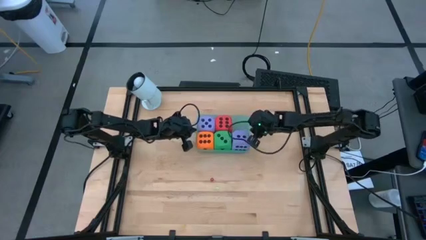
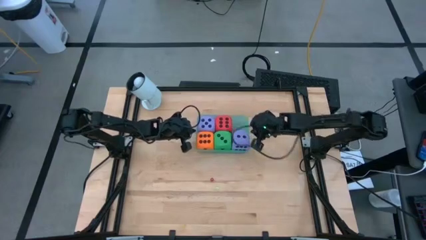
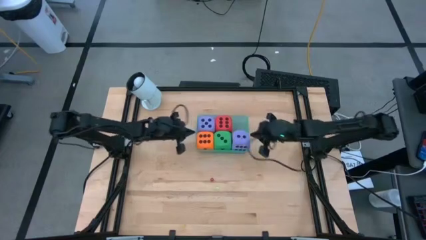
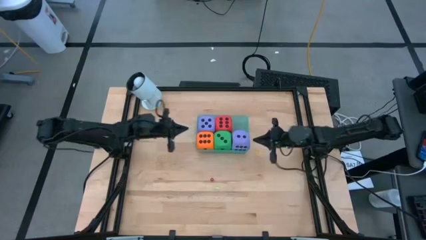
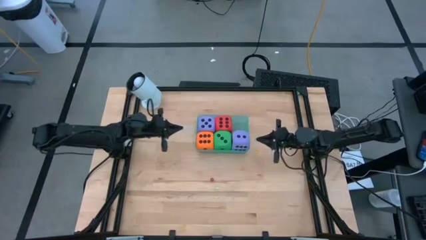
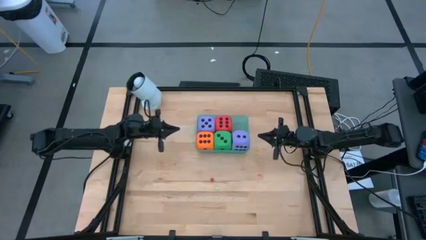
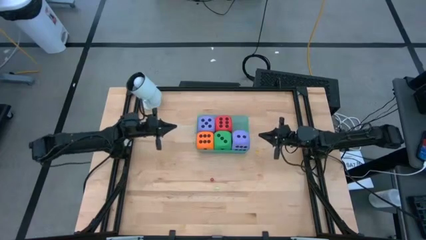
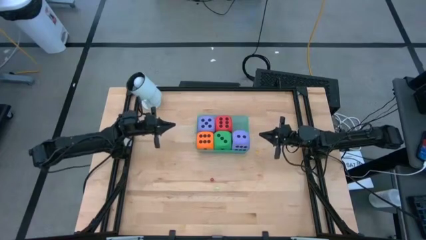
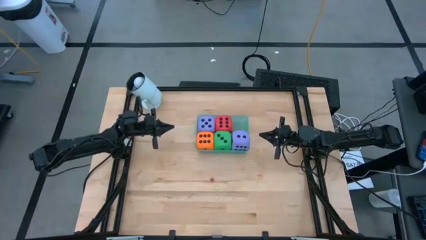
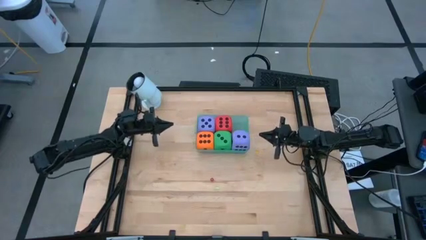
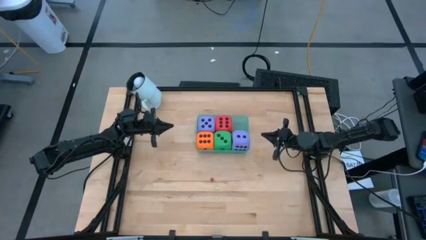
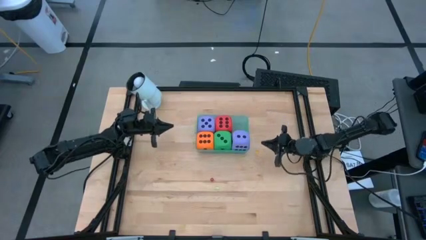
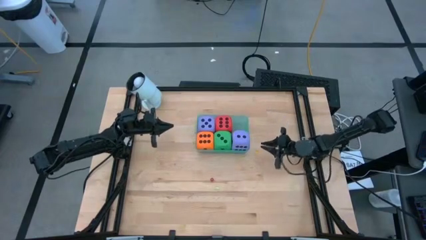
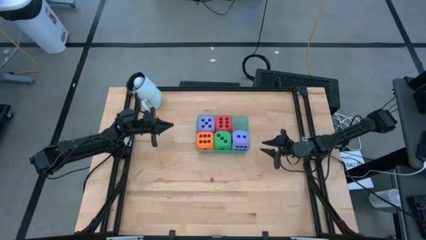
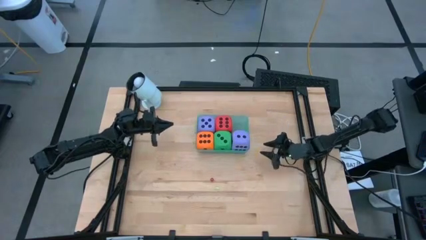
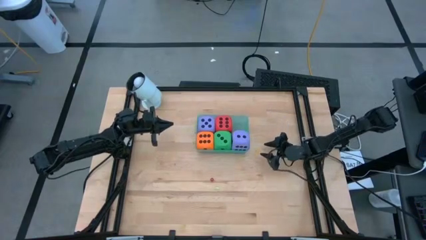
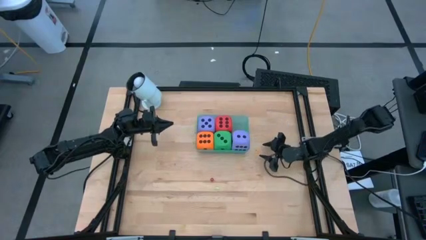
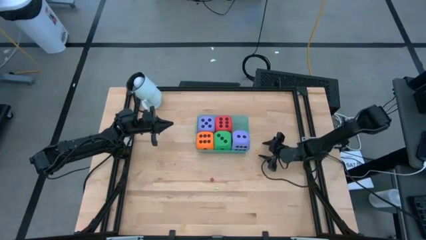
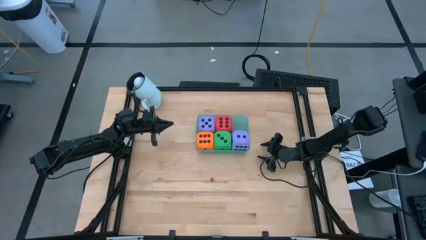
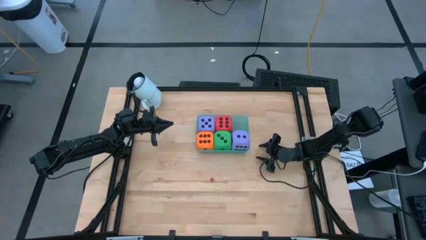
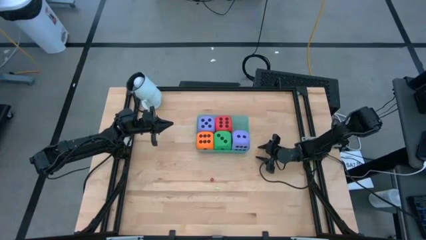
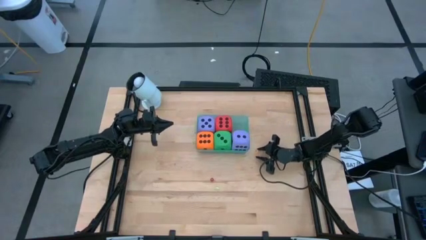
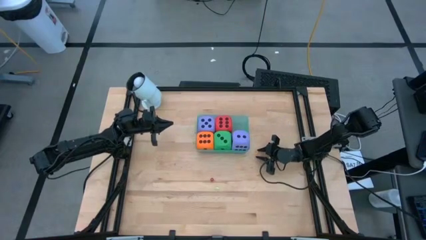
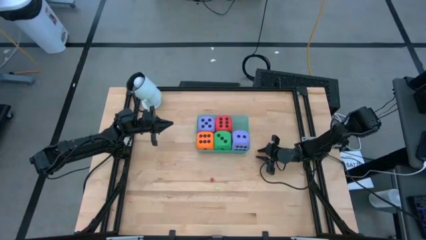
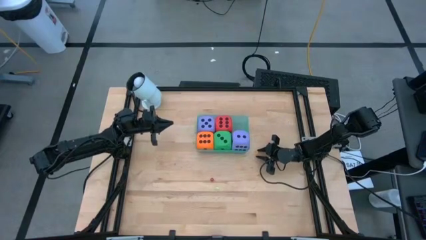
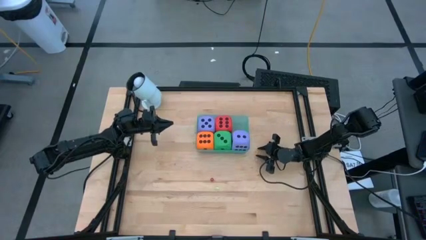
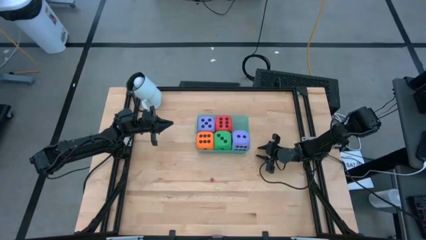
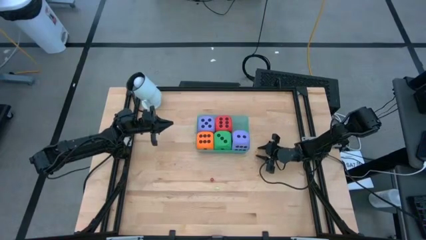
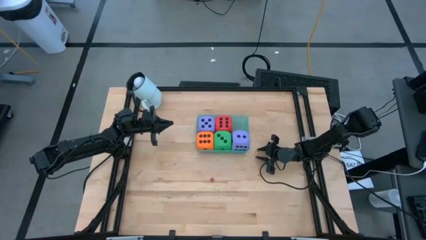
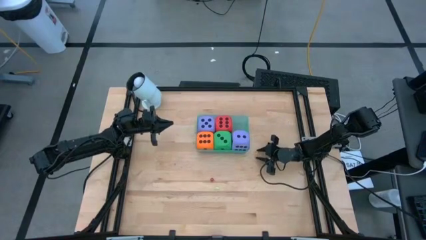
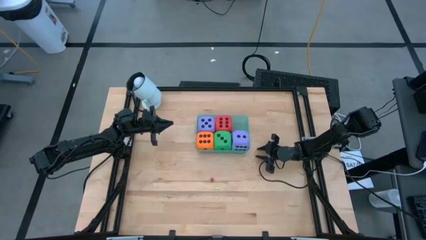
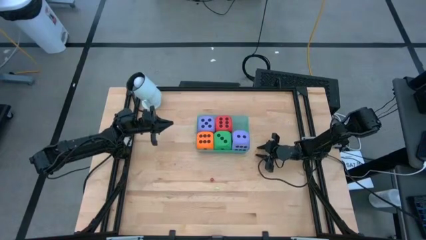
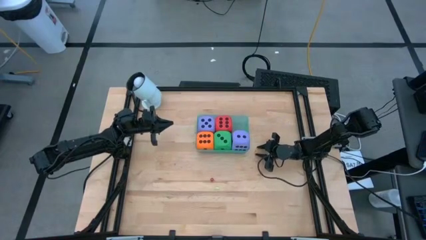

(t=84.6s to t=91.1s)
Task: Pick & Place Dice
Put the small yellow die into the green bin

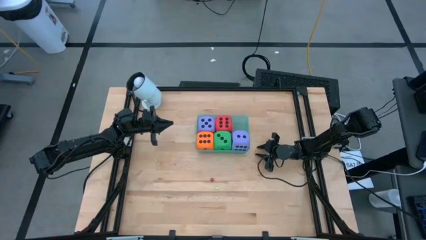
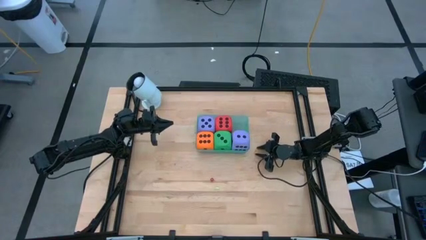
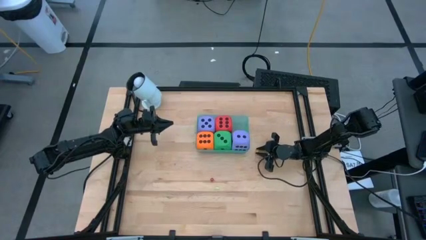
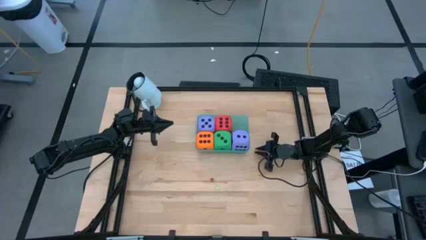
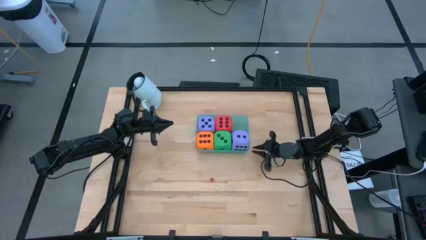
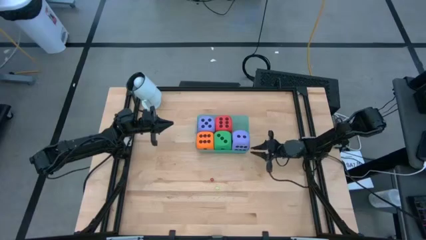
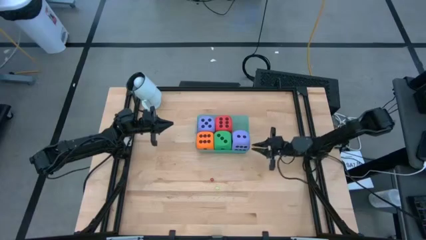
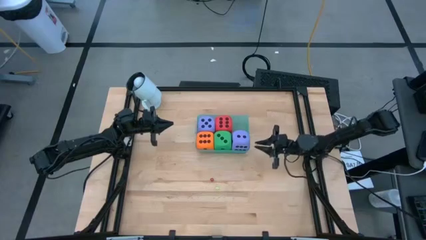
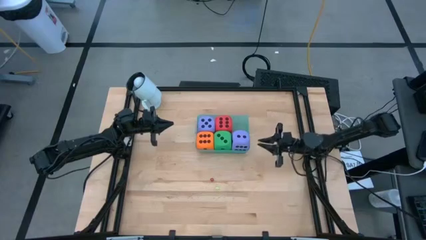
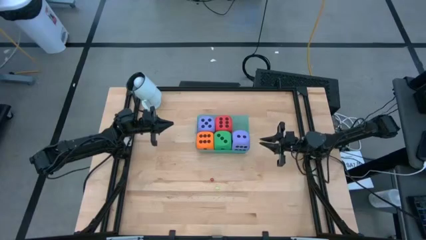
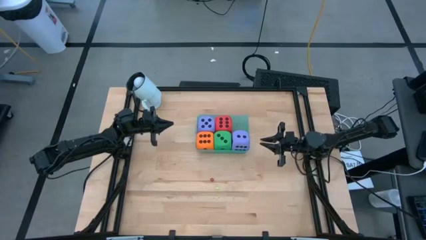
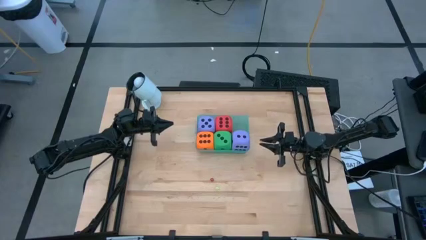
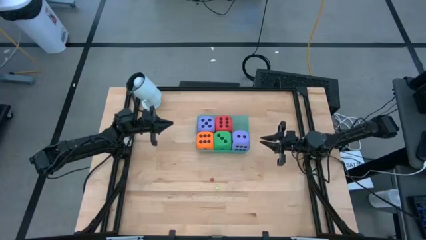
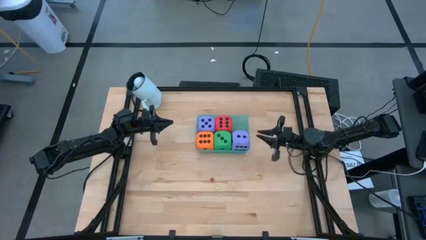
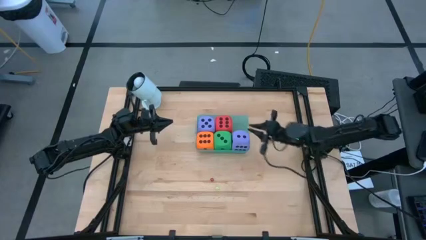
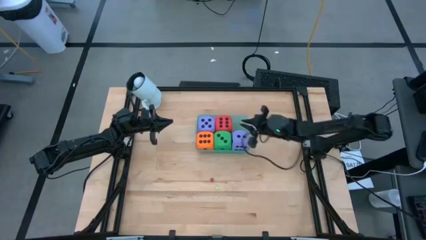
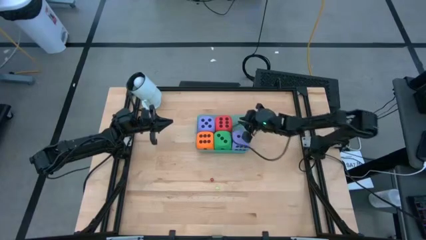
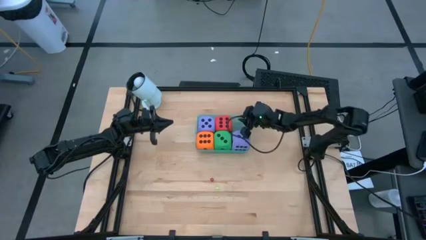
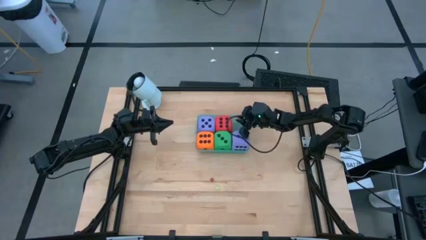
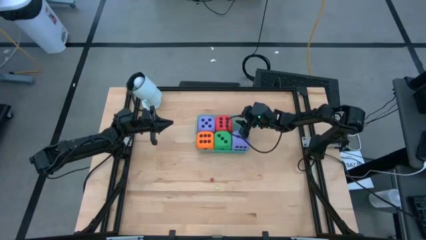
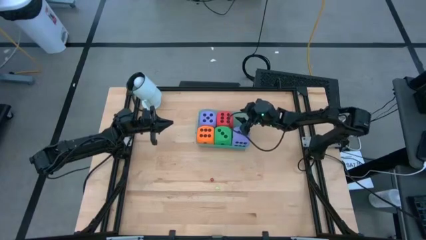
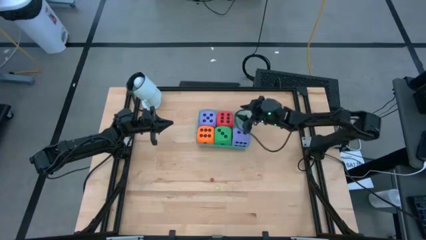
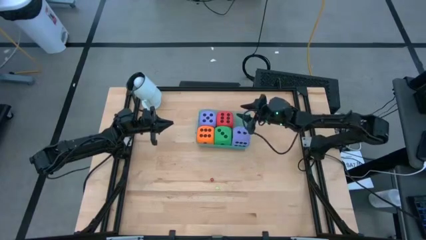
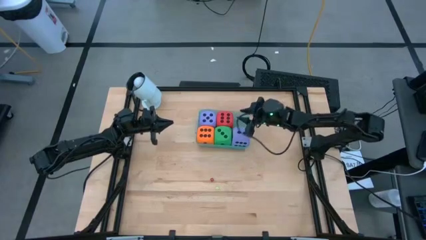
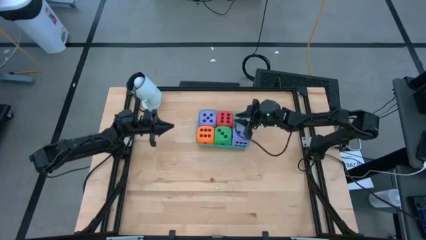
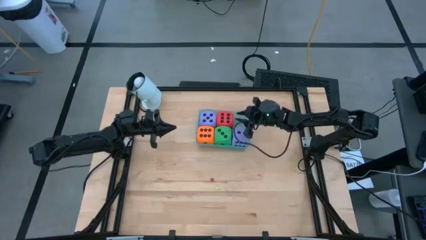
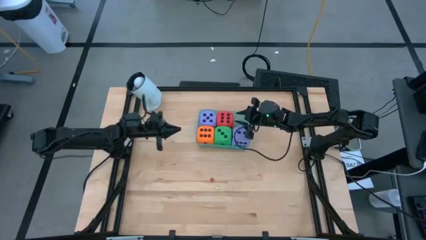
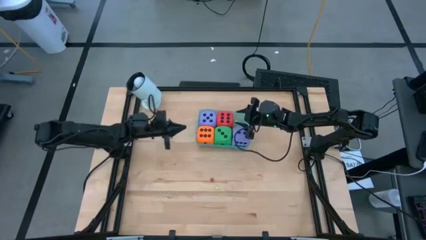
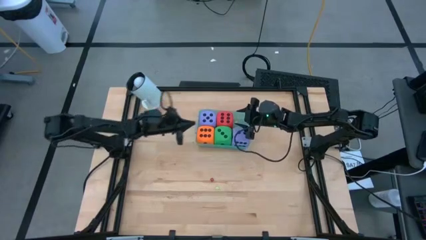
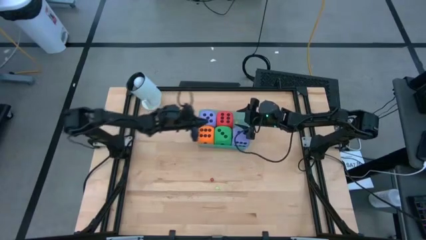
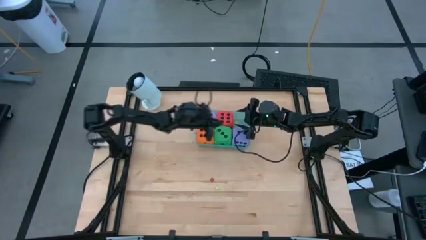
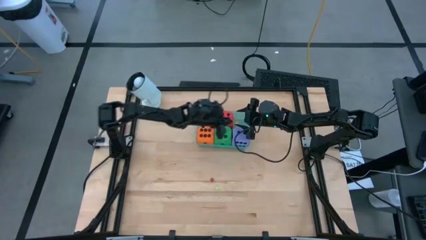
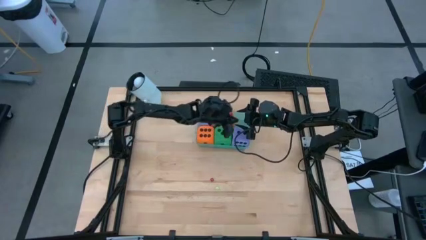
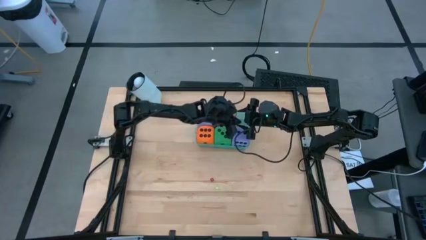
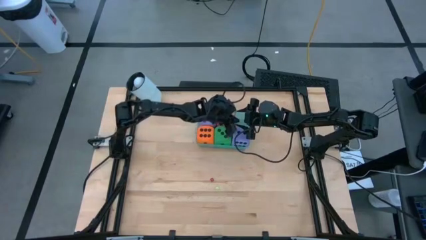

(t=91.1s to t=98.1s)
Put the small yellow die into the green bin

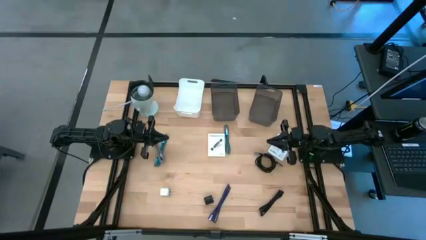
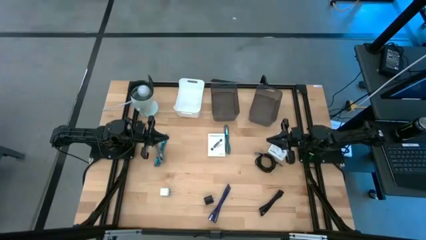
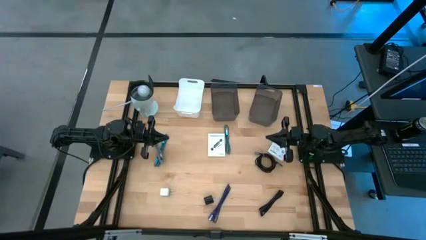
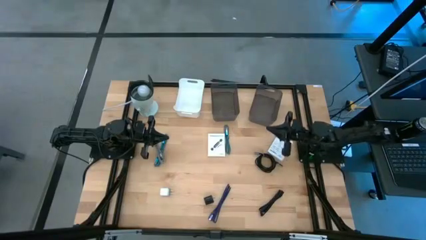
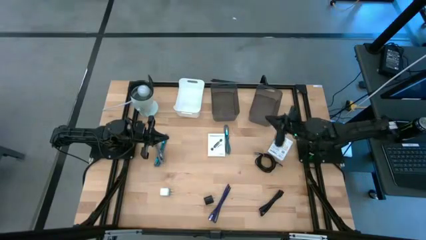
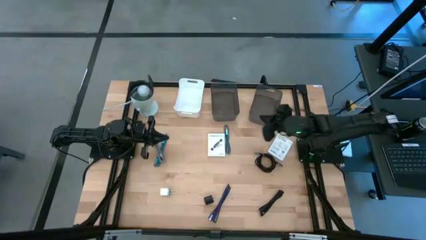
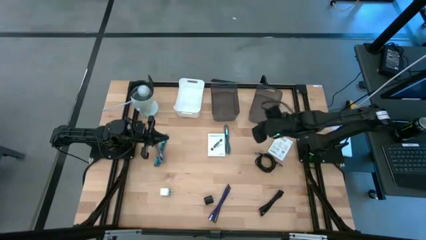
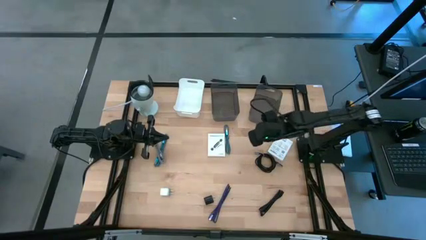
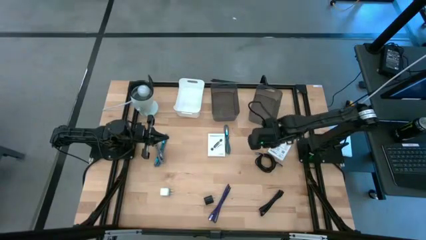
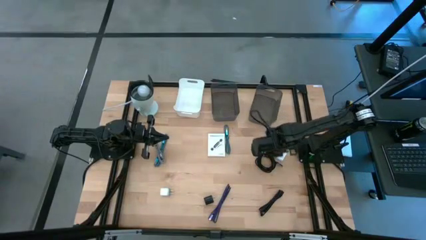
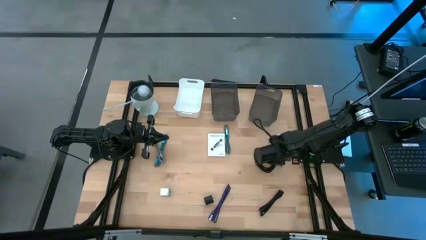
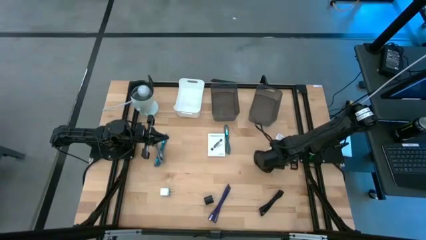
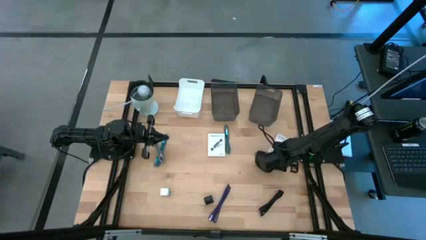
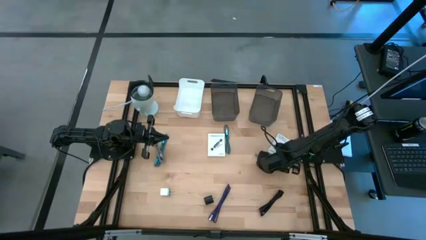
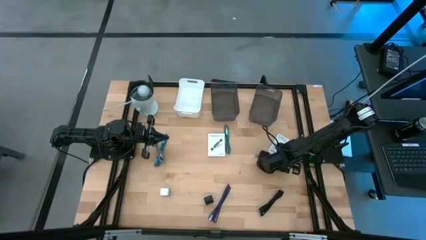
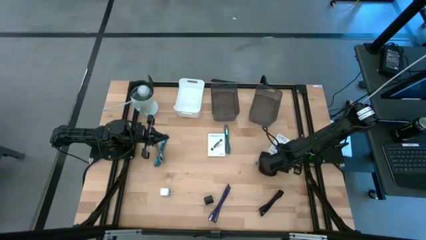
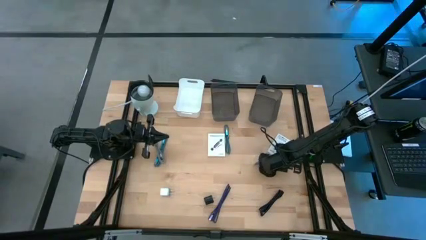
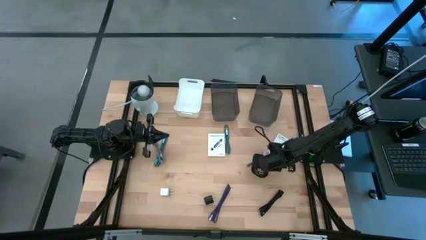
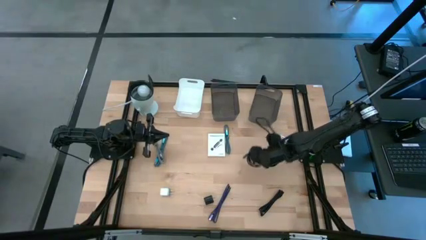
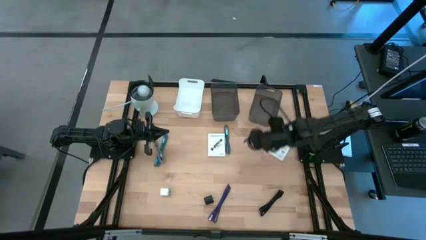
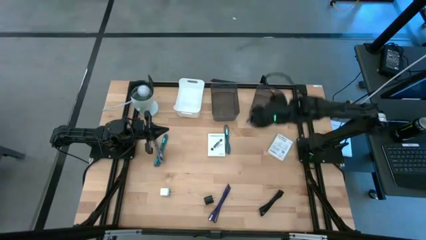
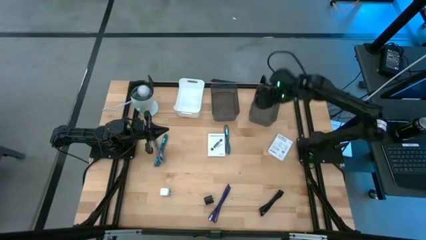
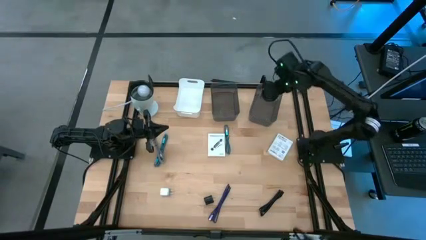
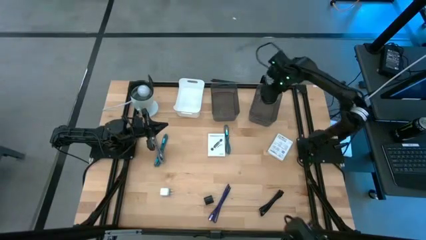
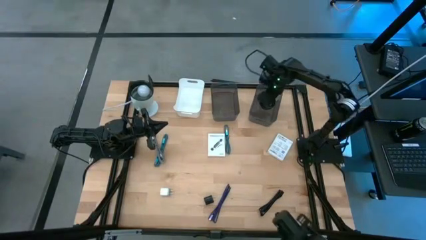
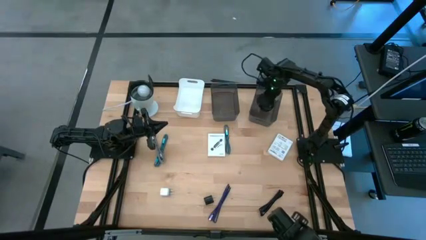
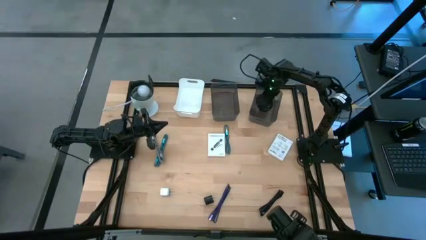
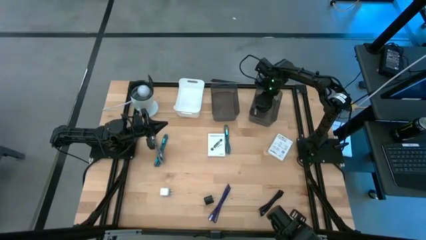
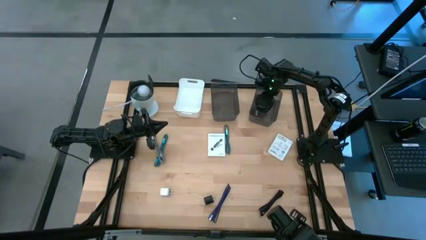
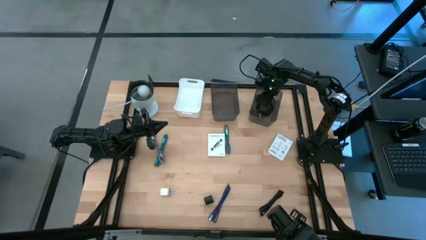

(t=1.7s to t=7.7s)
Task: Pick and place items into bin
Put the top black charger cable into the right black bin
